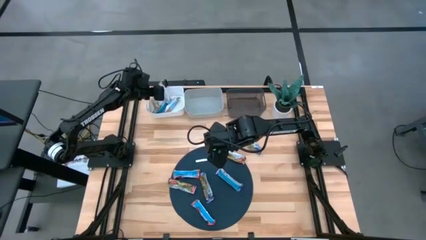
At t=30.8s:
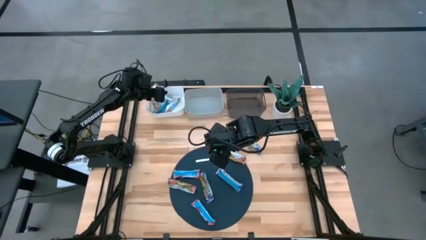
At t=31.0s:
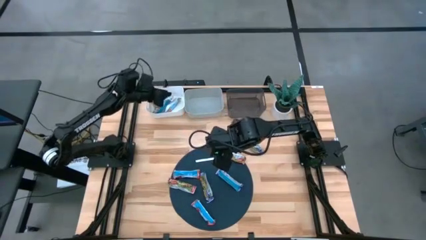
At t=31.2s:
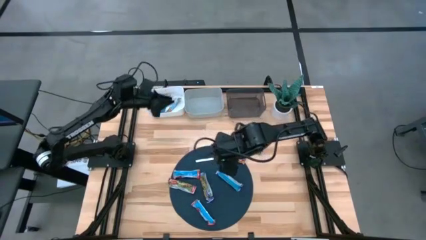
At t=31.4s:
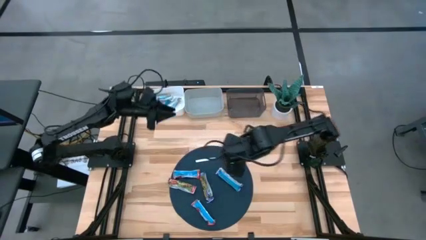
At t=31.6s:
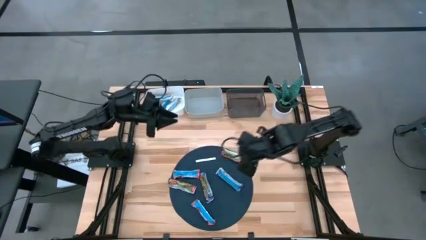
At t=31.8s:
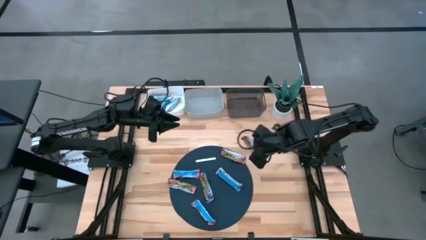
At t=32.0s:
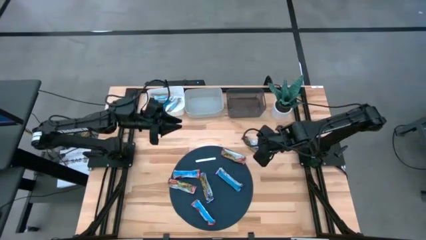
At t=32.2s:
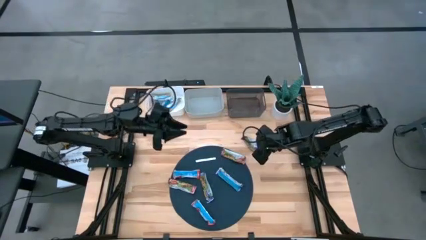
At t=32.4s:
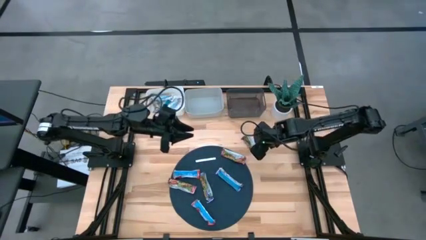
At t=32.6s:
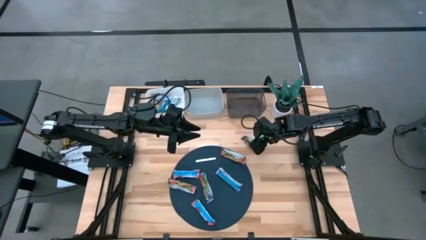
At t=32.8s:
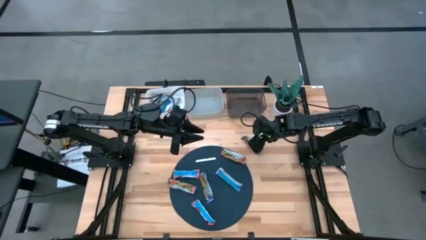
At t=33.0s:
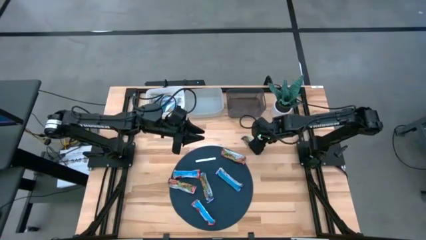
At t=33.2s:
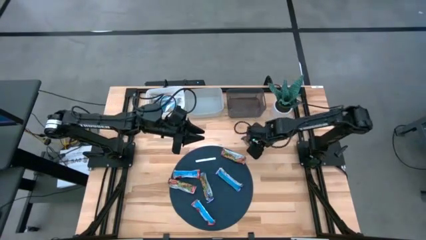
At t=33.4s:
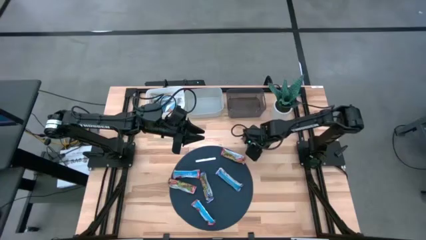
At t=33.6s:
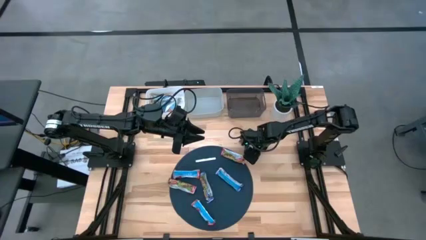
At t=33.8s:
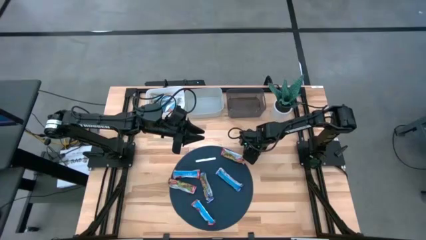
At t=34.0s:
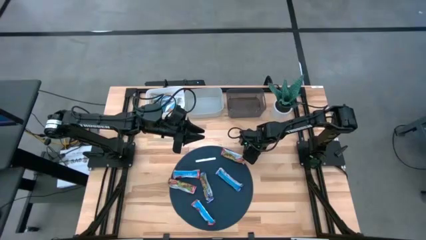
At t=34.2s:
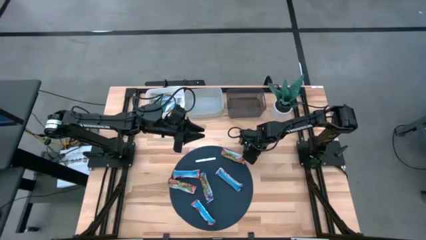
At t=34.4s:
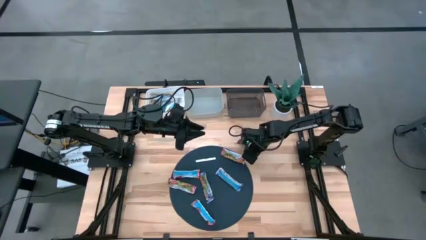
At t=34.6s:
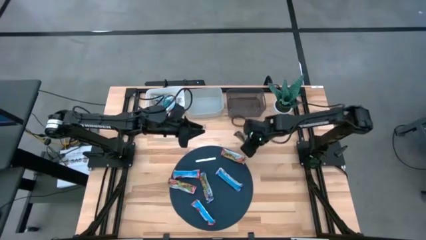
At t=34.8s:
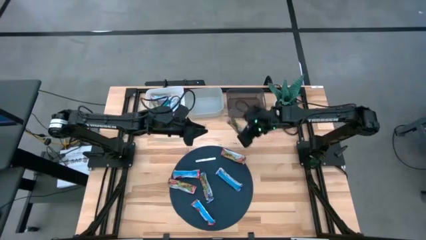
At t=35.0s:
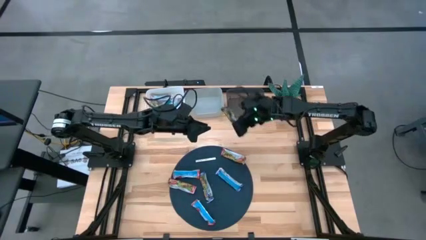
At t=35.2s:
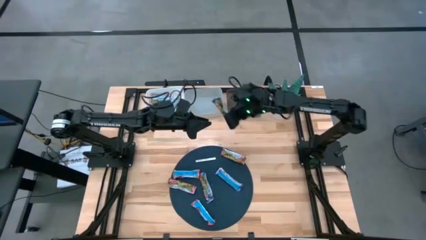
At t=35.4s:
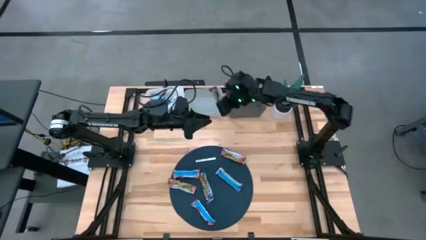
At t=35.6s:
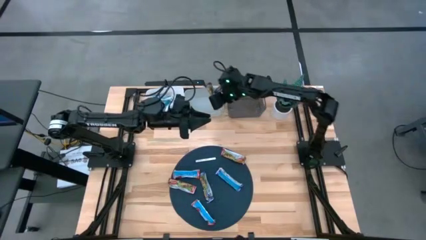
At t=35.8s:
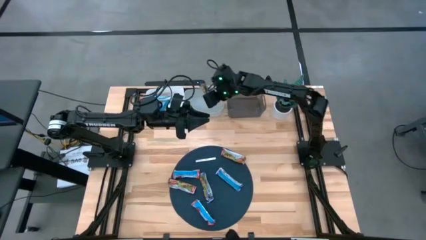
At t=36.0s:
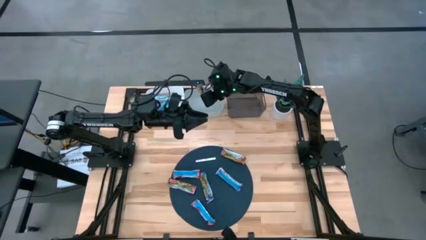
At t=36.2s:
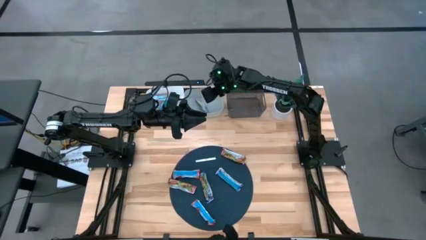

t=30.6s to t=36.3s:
Task: Pick and place Granola Bars by type
Put the blue granola bar into the gray bin

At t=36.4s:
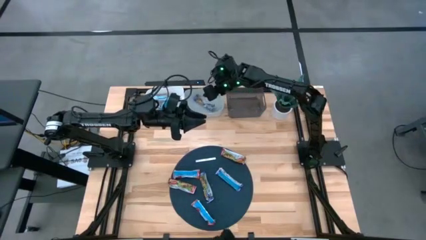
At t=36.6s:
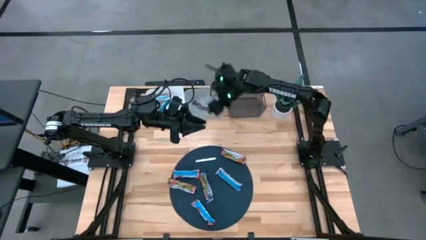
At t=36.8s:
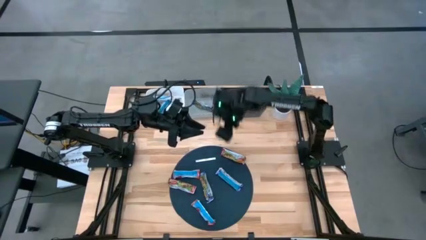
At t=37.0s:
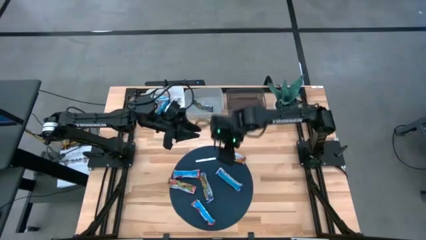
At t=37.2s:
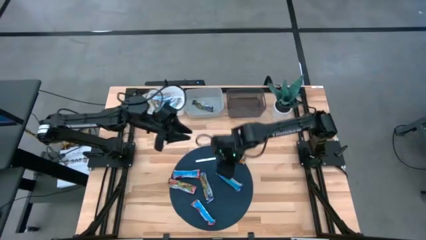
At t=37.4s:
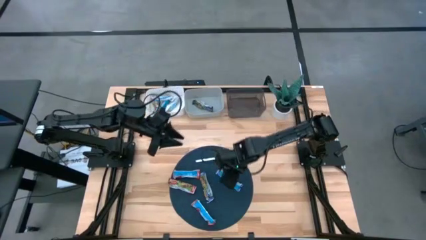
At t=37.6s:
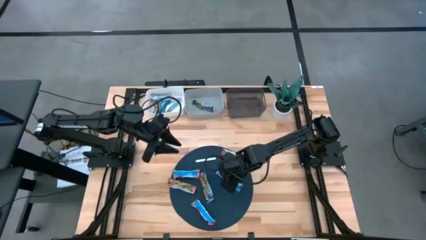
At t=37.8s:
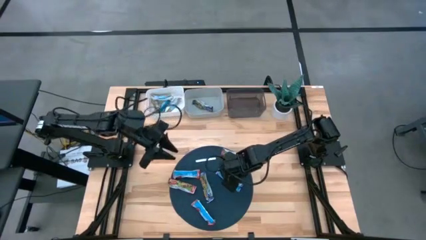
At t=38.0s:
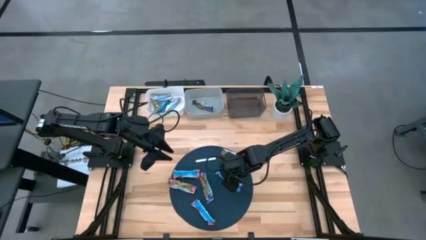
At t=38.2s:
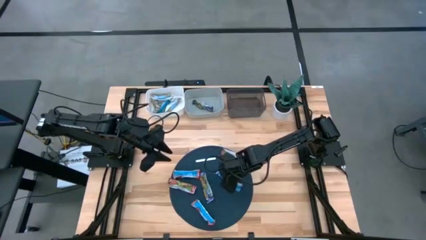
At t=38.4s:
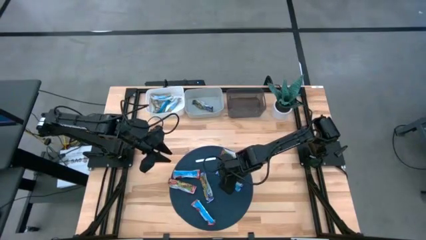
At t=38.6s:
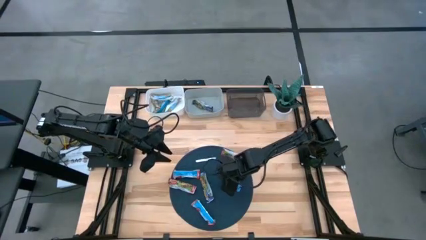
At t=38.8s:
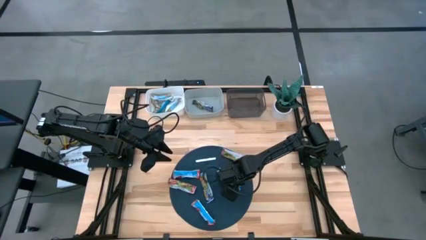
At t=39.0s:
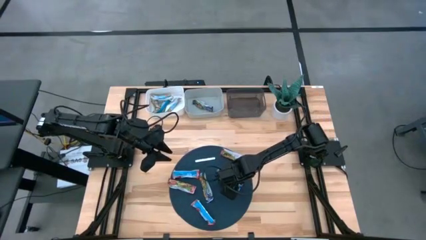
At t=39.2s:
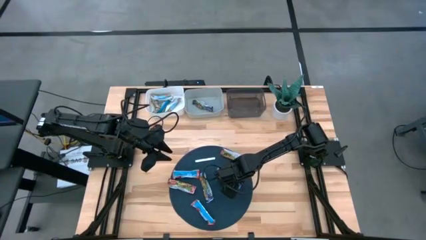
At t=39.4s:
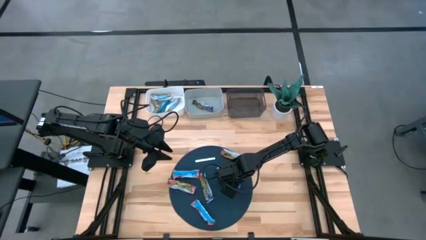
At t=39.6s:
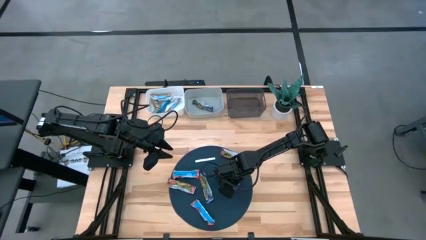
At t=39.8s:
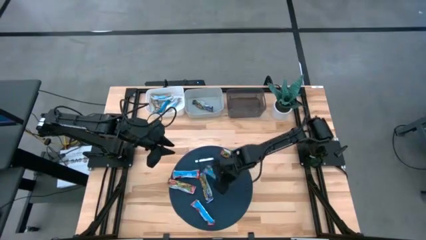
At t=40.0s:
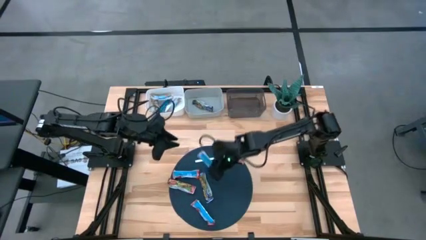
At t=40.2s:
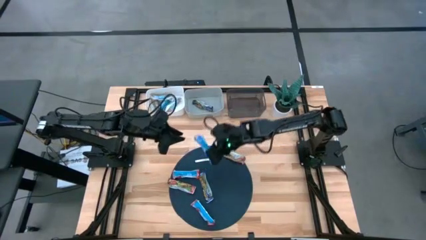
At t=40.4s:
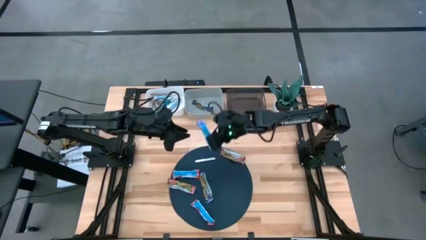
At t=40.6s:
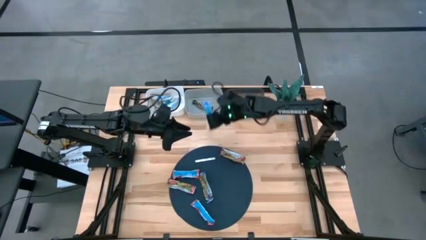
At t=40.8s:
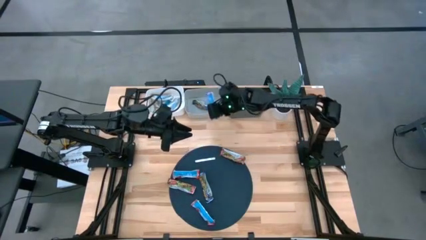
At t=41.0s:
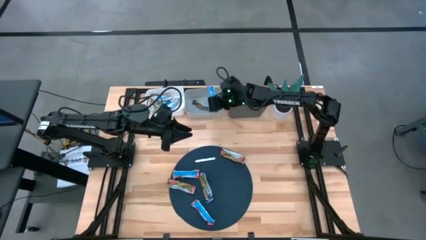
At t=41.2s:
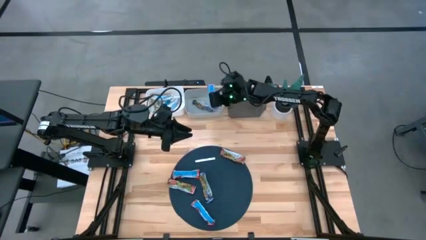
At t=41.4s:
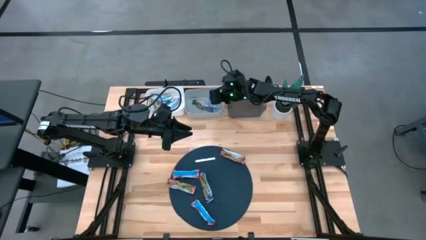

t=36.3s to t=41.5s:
Put the blue granola bar into the gray bin

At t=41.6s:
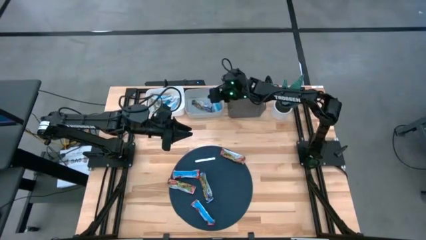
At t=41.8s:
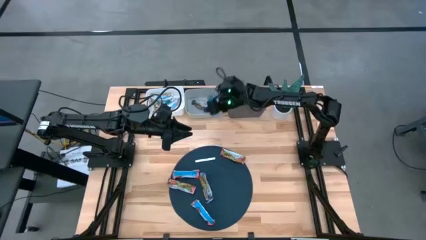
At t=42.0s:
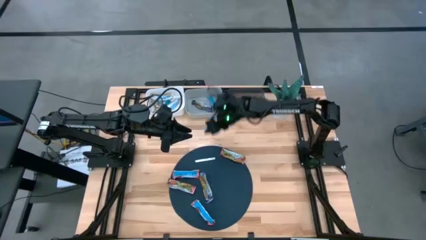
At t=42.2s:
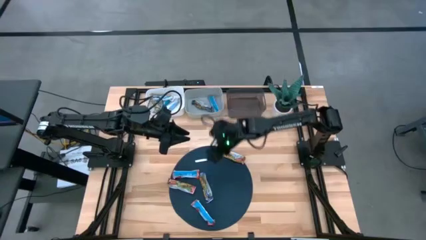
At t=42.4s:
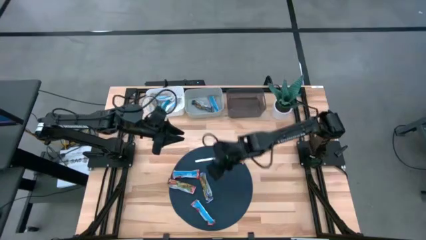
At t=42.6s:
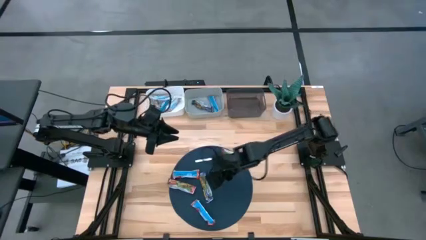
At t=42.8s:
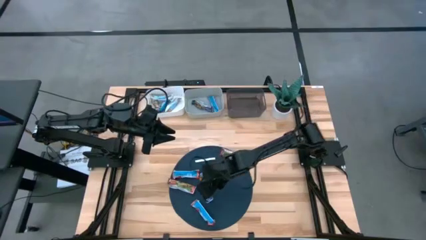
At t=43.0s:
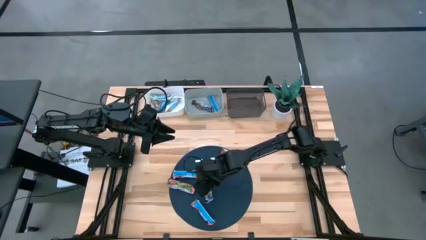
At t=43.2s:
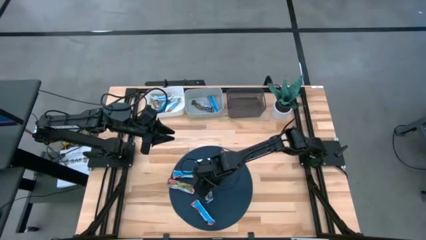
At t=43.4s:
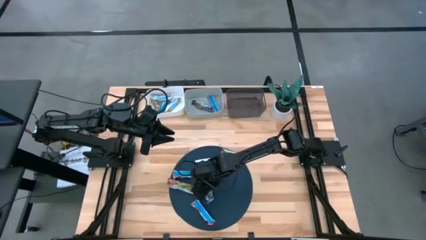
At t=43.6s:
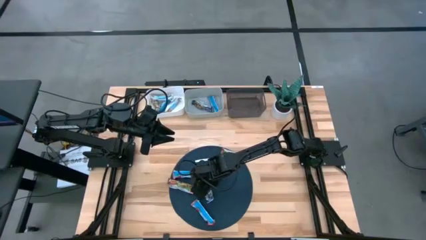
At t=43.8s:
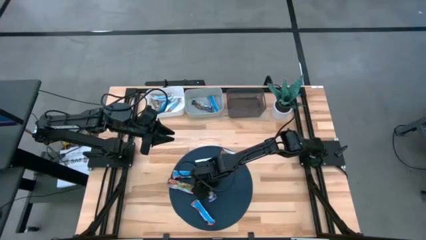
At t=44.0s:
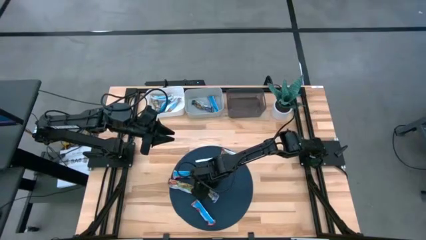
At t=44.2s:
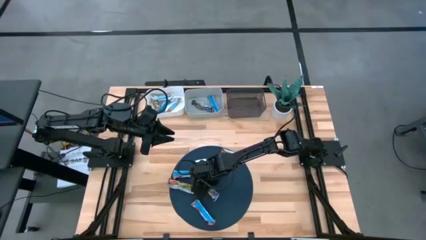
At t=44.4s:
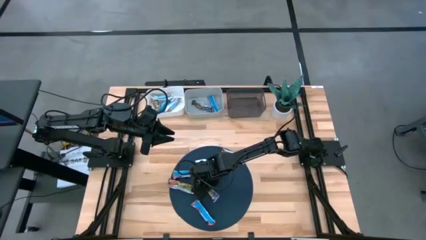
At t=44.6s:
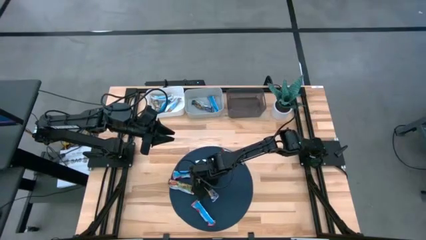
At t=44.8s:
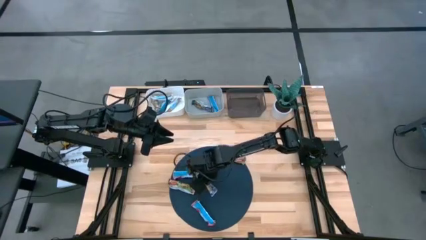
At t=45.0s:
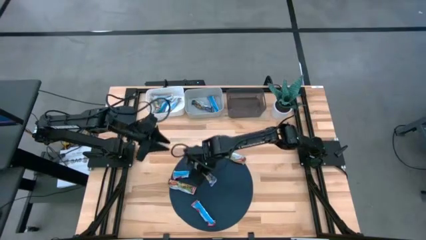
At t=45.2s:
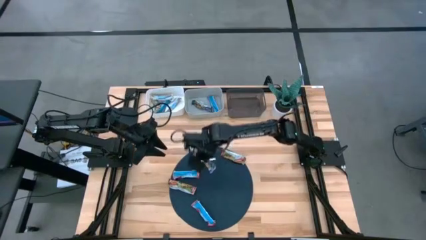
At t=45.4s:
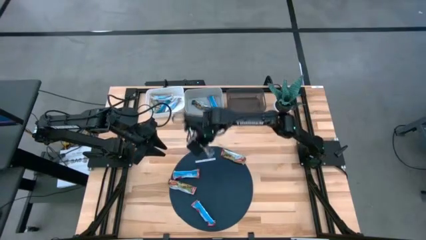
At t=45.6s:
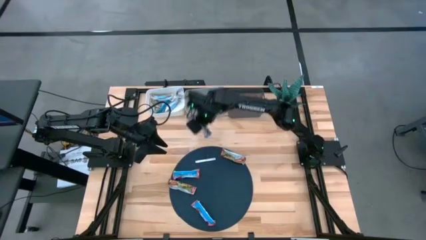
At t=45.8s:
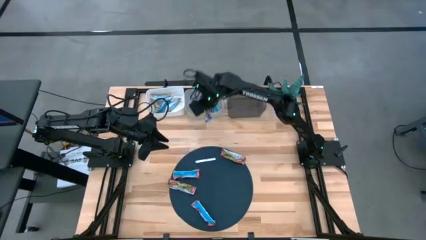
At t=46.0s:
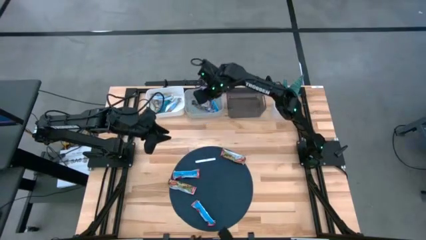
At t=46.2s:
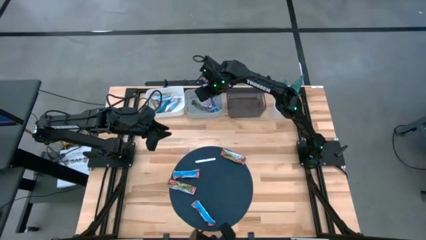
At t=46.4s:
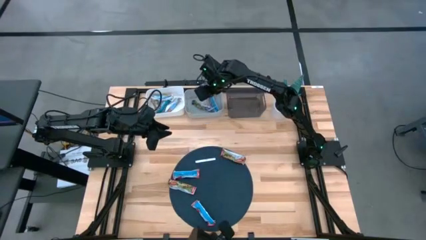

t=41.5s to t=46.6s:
Put the blue granola bar into the gray bin
